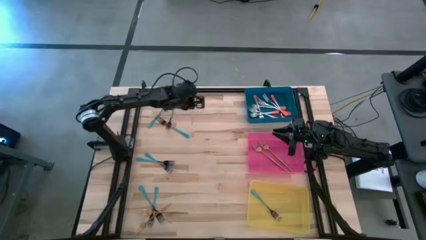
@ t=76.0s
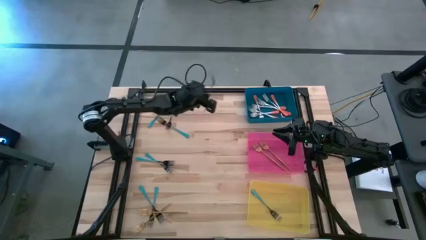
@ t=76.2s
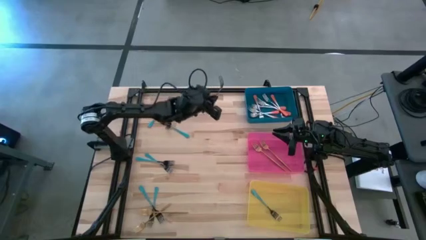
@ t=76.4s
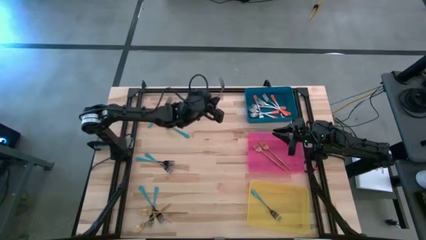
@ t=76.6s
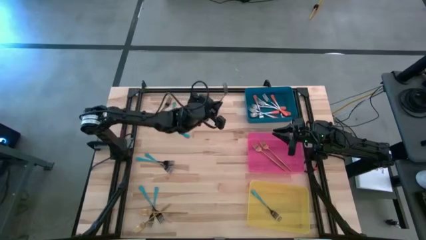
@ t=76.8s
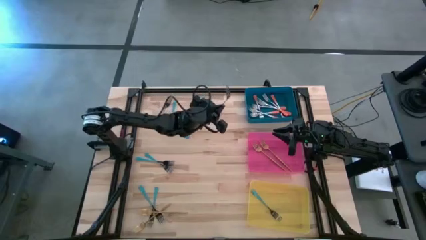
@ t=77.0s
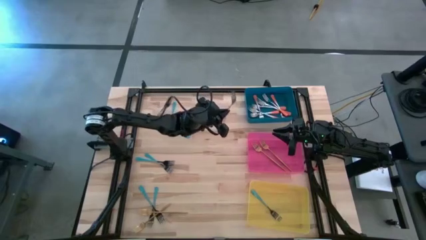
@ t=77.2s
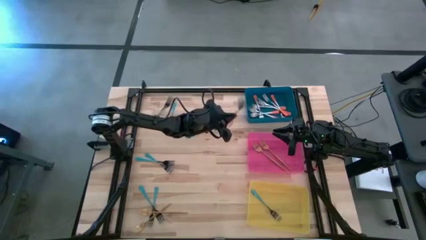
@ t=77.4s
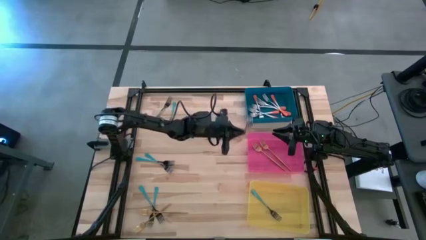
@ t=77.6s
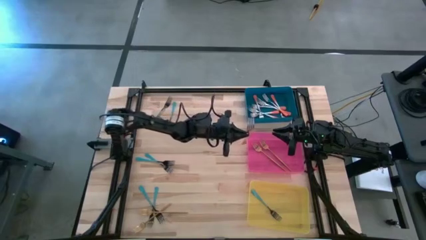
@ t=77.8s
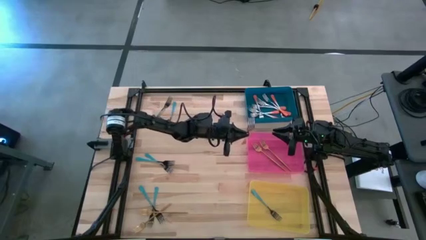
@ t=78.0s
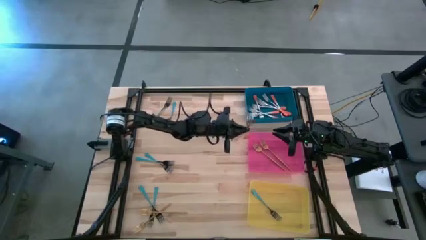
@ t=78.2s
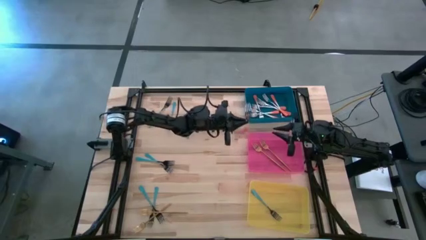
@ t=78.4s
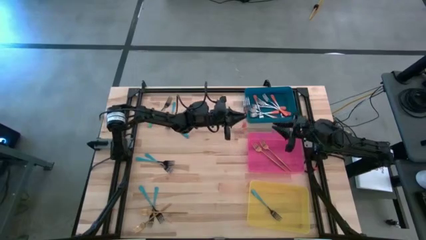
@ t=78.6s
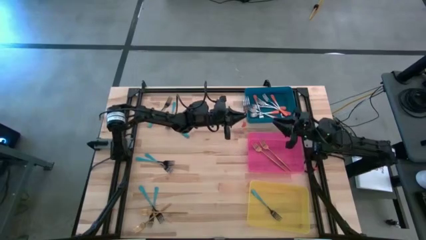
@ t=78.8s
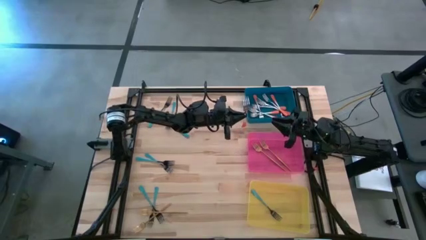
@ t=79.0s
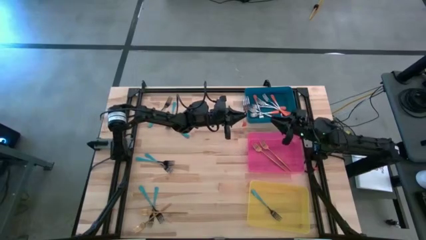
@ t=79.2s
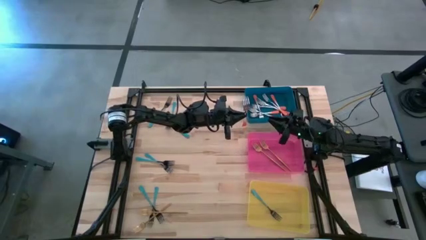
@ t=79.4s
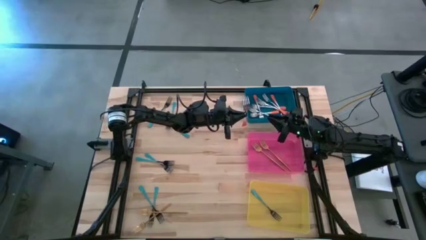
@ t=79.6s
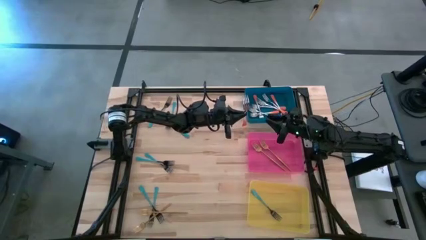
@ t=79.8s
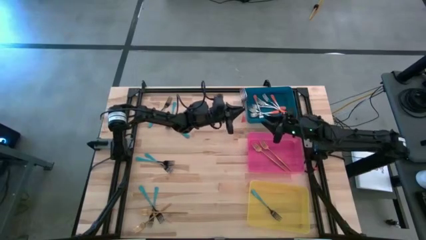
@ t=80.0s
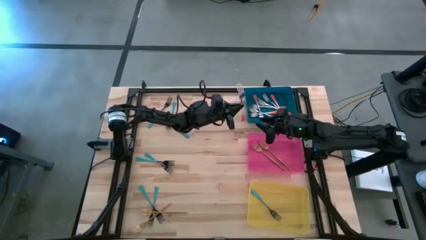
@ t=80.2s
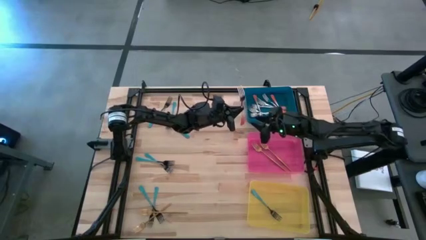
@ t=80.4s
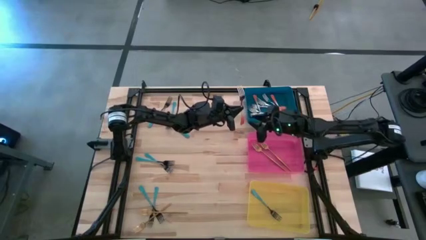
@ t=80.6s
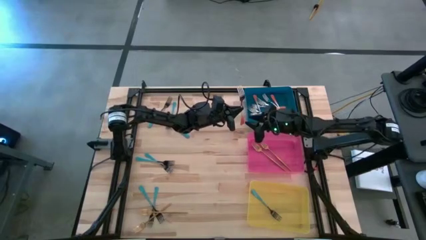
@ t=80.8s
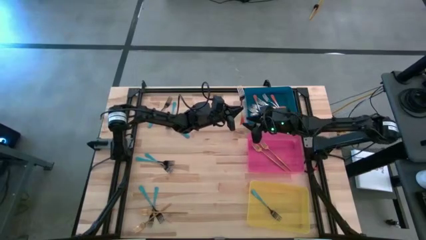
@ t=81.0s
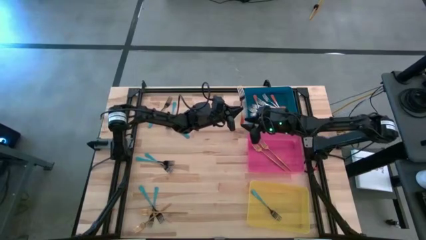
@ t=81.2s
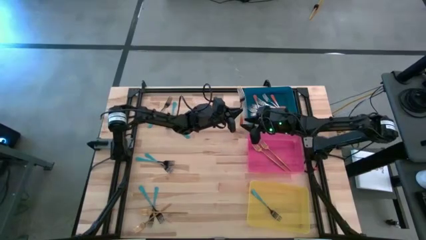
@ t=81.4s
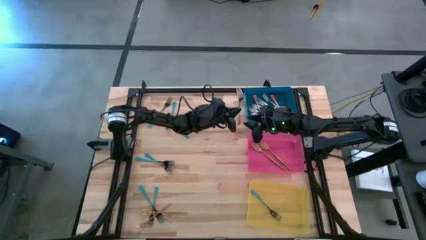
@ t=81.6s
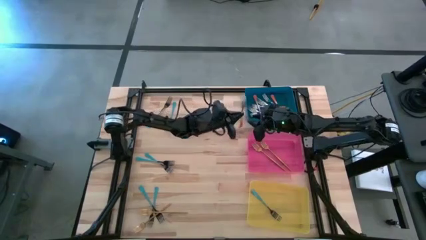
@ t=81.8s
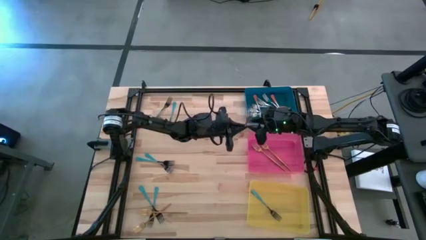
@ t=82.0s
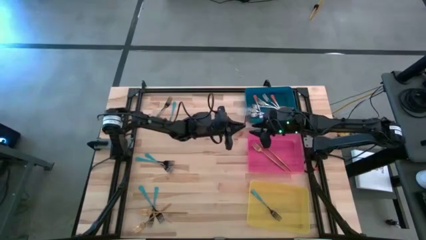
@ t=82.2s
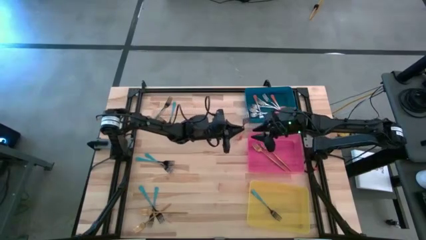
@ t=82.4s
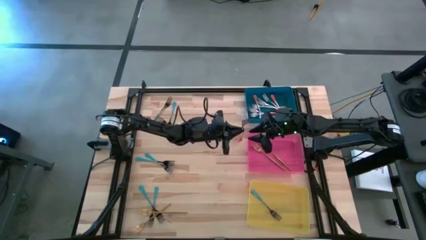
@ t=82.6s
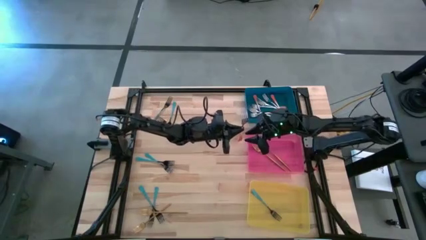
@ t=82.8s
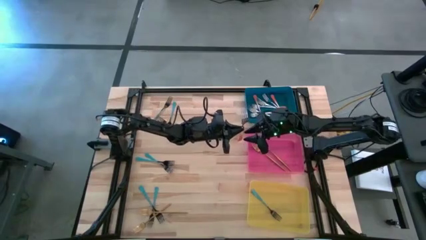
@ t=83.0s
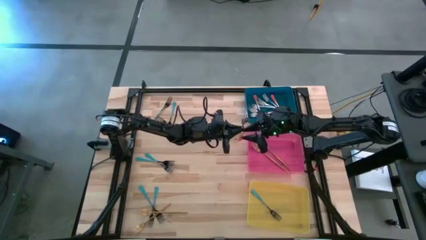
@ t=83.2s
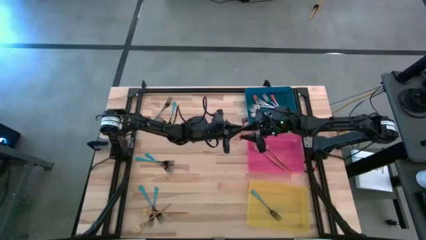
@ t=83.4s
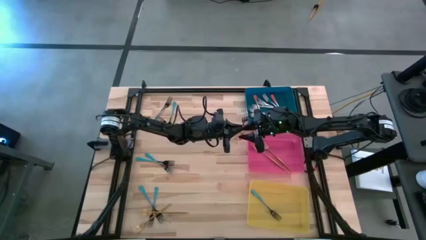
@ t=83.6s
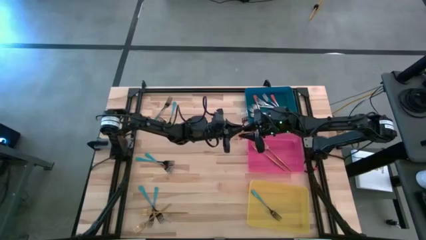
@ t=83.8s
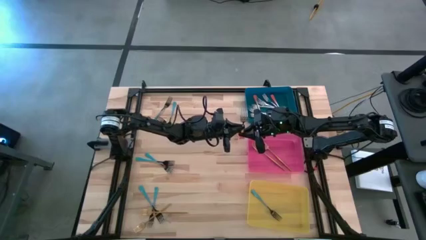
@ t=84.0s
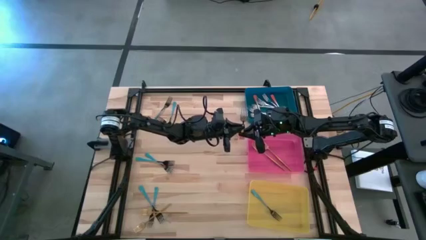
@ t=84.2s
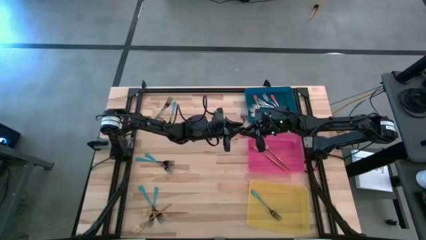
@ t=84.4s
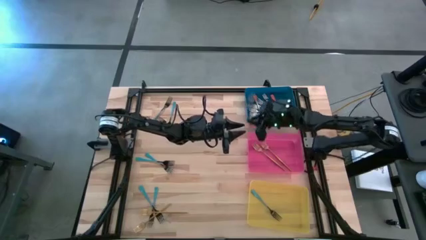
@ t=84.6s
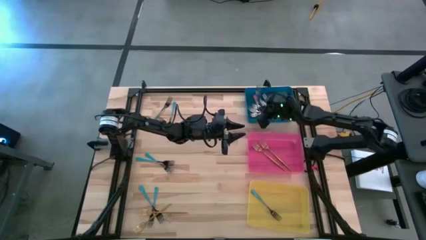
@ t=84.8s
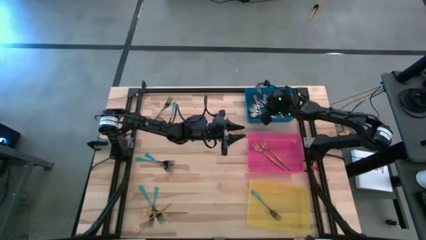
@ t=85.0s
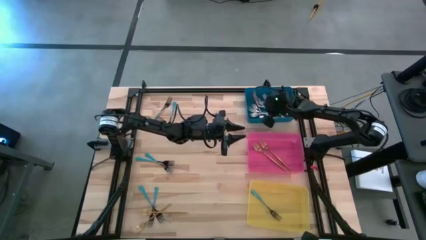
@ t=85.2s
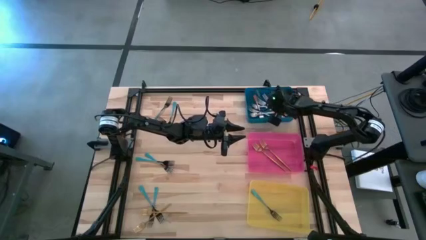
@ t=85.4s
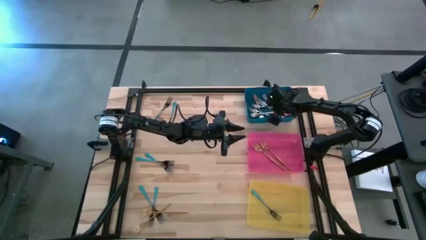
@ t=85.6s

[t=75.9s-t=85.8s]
Task: Sort silverware by color (type)
Put the orange fork into the blue bin

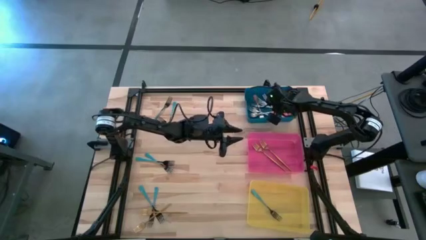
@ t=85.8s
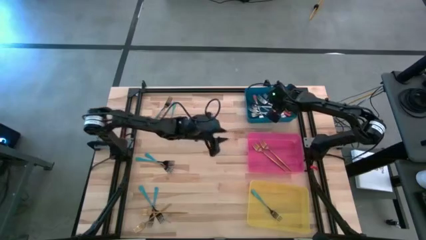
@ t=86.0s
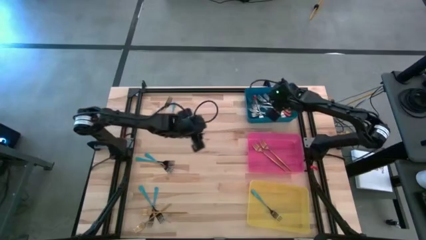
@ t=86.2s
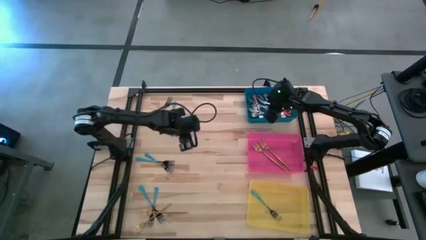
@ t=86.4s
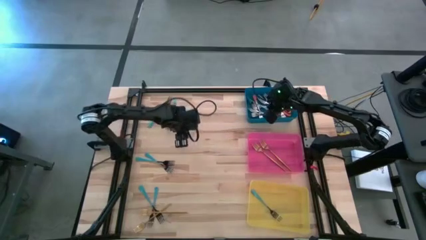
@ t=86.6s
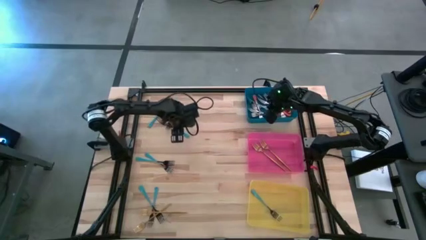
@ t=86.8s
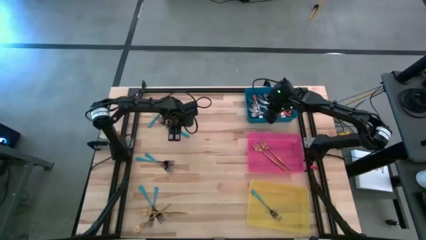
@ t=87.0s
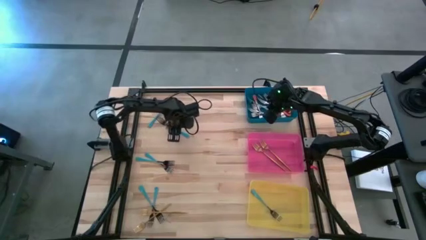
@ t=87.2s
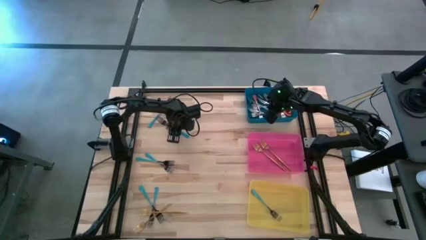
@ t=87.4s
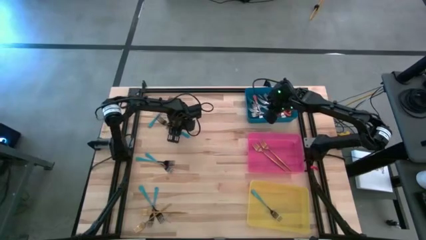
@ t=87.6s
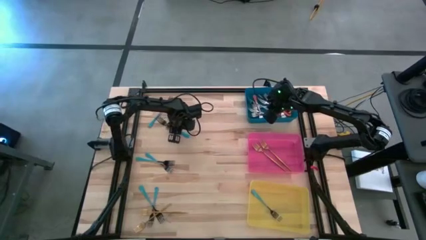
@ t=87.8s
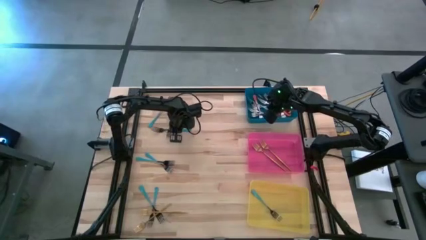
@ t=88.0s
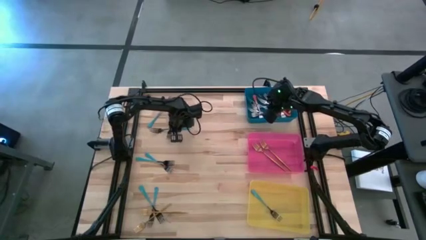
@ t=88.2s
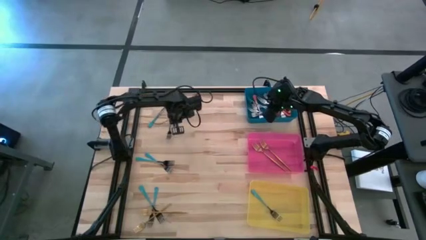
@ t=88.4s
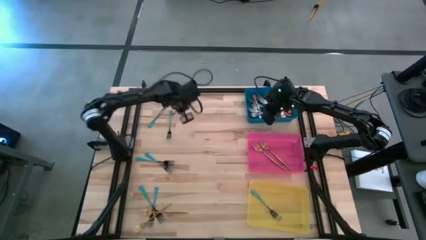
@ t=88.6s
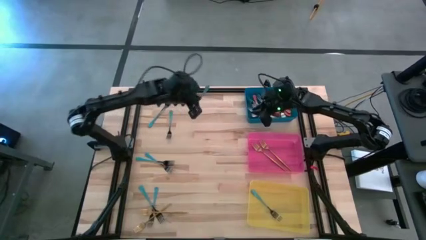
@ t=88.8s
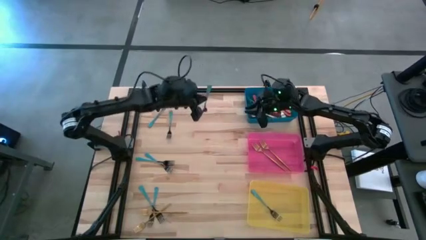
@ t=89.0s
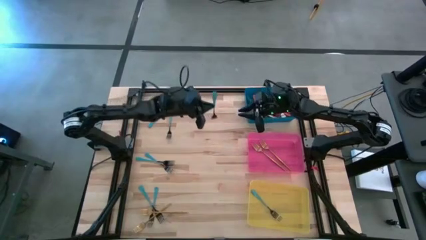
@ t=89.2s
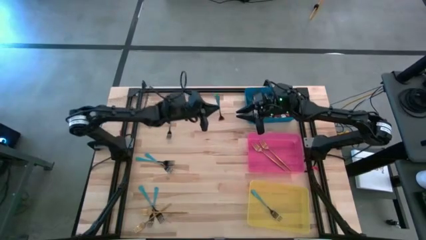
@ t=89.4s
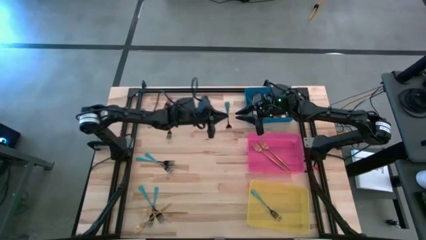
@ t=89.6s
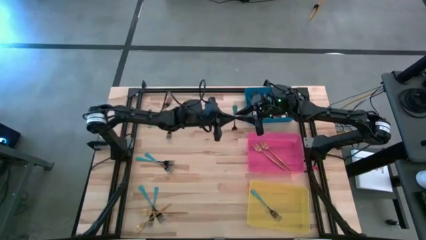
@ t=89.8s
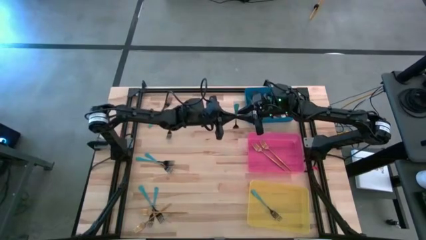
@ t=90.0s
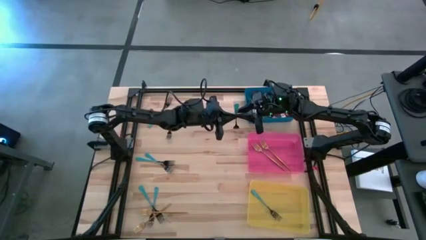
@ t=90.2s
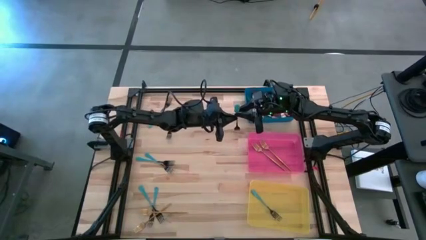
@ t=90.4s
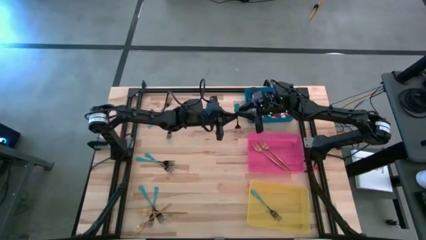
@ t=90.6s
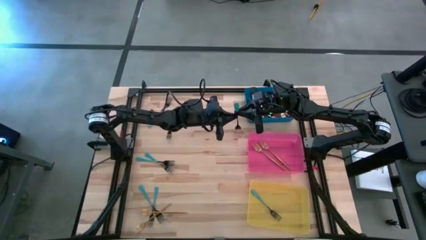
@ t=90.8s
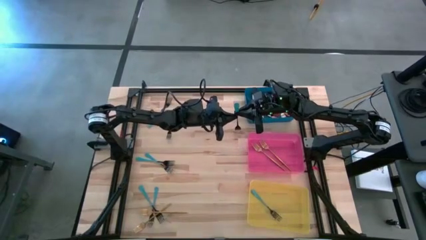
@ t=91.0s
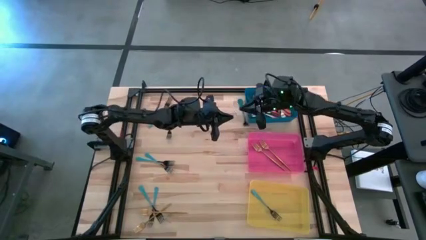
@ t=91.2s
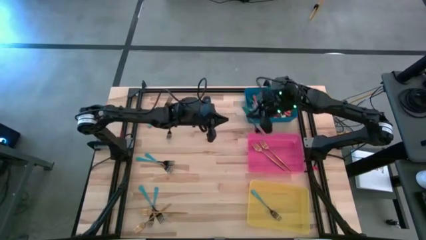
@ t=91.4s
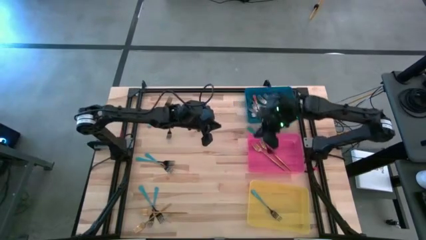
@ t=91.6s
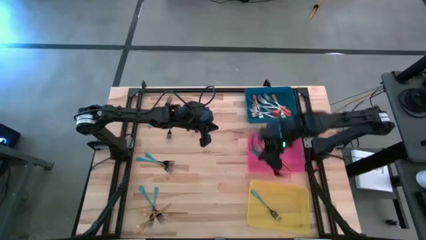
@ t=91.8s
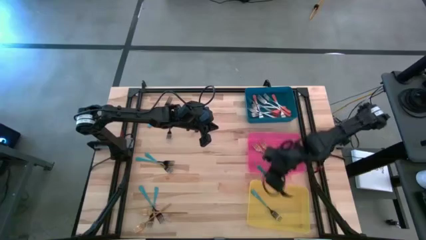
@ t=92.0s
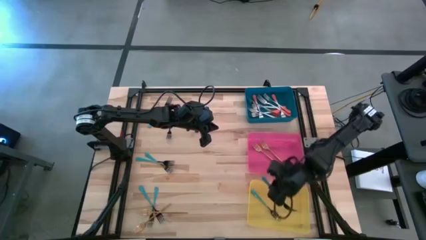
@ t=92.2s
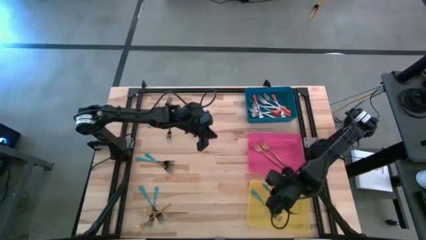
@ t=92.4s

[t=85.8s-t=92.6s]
Put the blue fork into the yellow bin

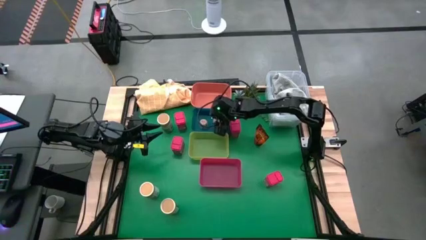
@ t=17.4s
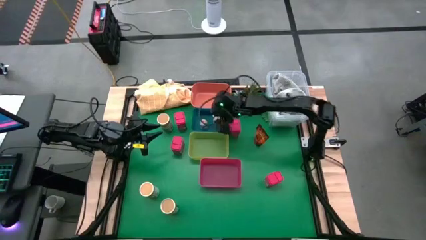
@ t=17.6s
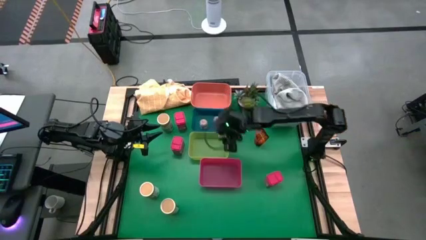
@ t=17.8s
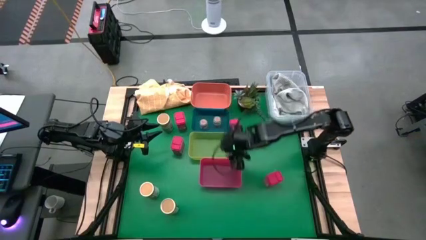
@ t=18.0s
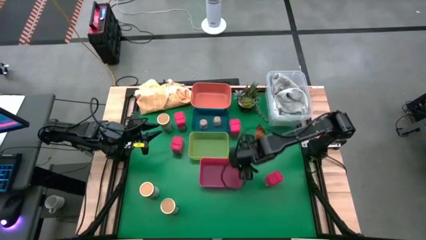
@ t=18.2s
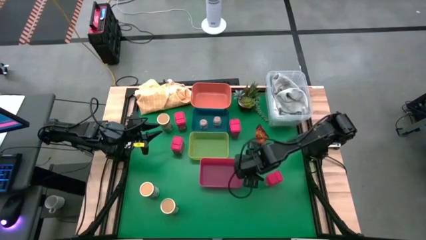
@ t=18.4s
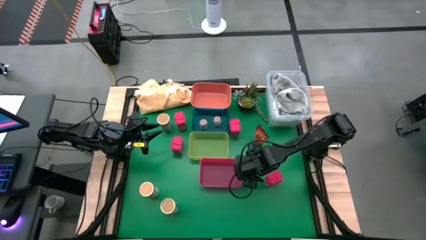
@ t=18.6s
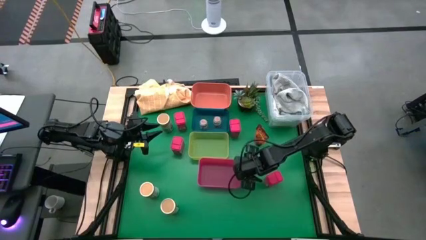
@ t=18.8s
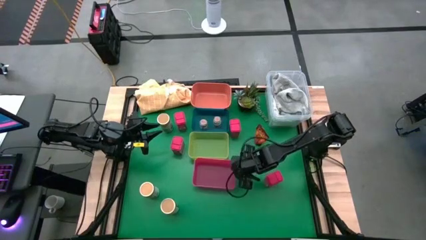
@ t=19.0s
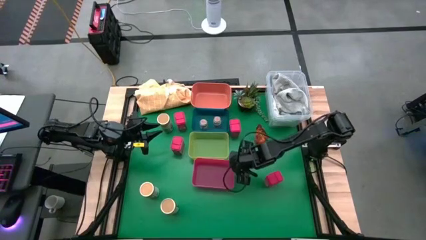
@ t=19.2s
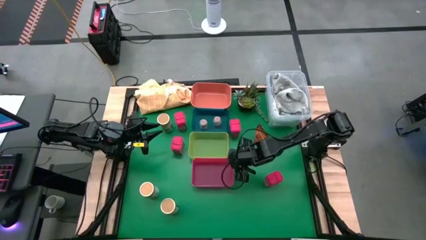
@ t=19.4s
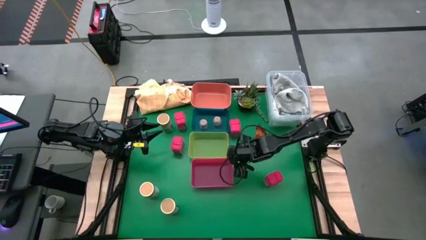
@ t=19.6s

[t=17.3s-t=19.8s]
Task: Sort spices by type
Adjust the red bin
